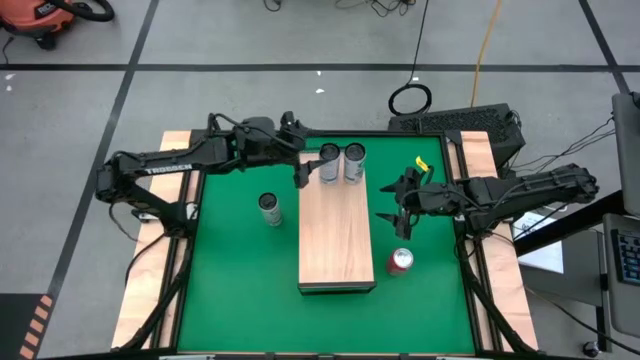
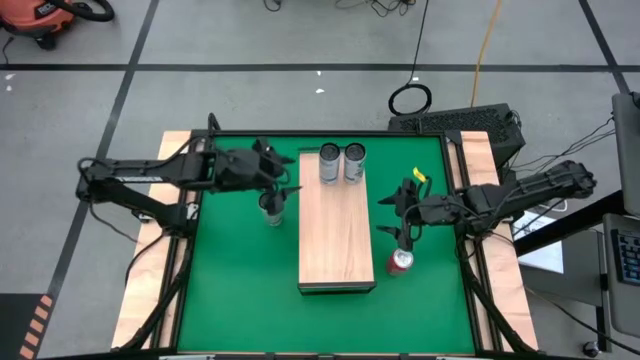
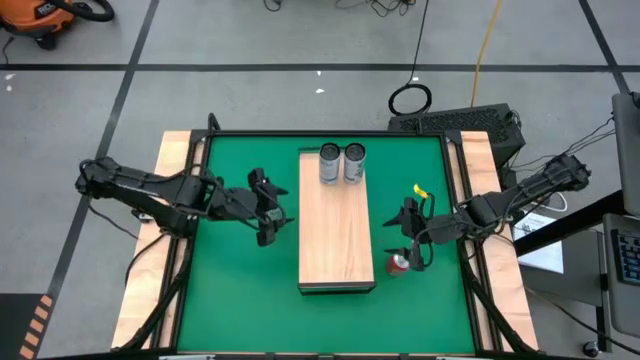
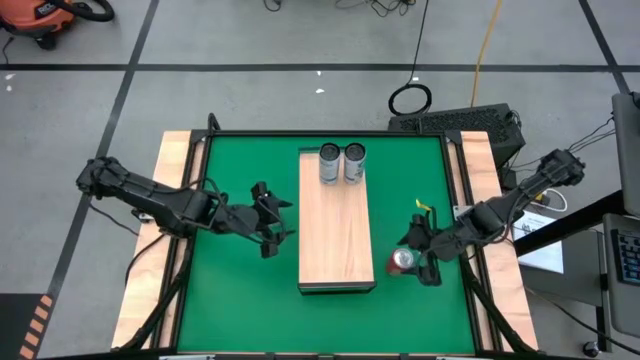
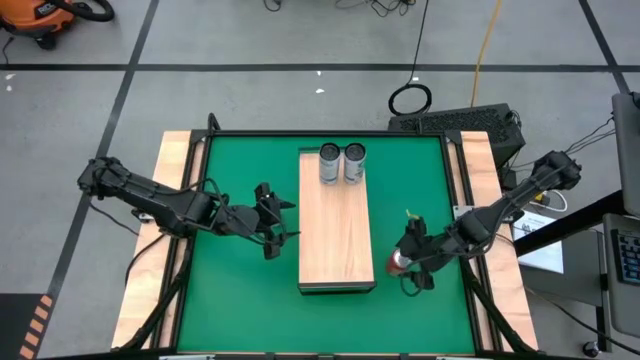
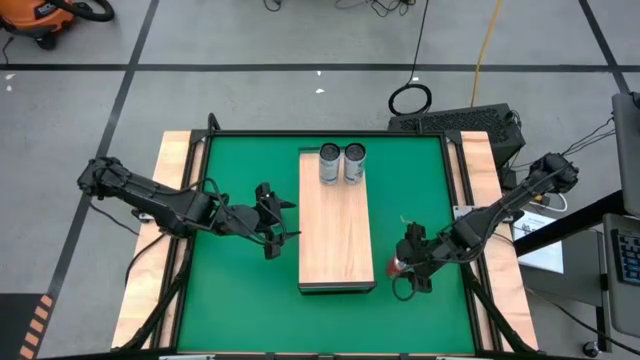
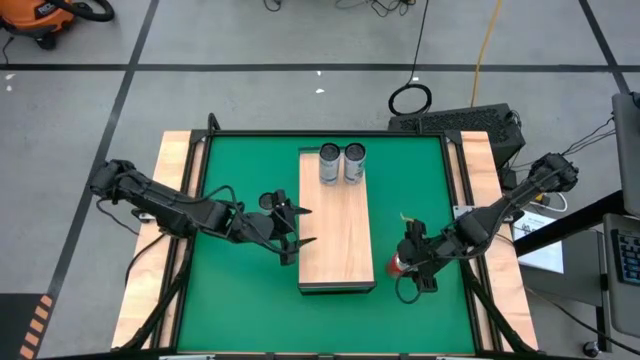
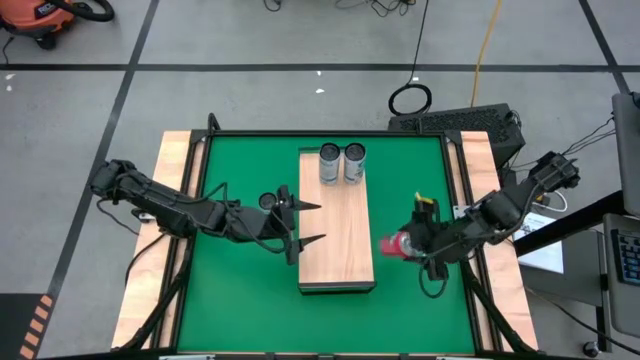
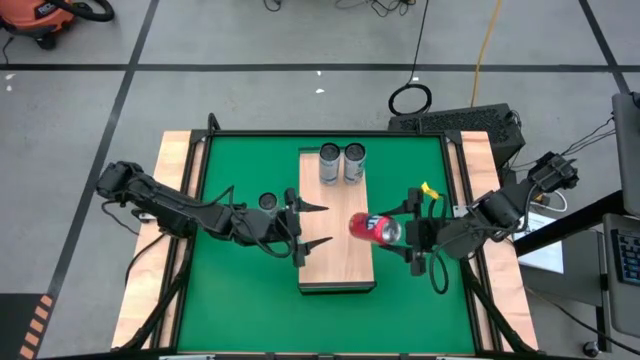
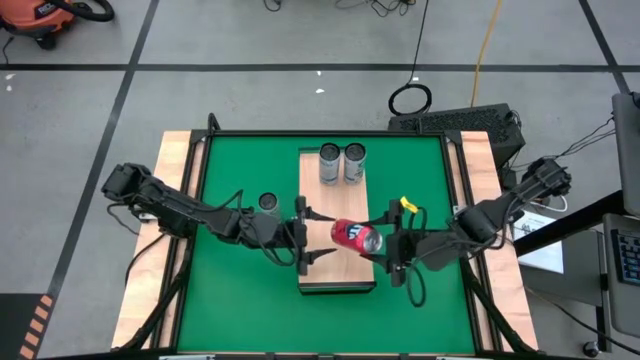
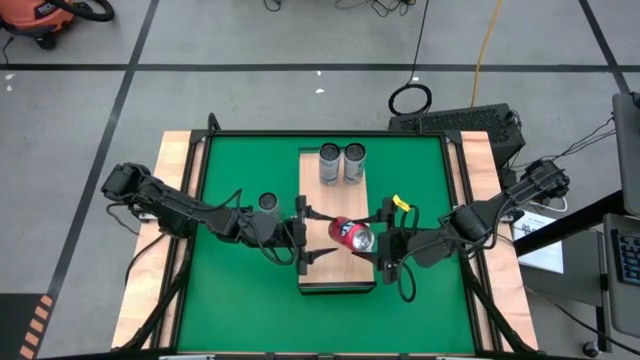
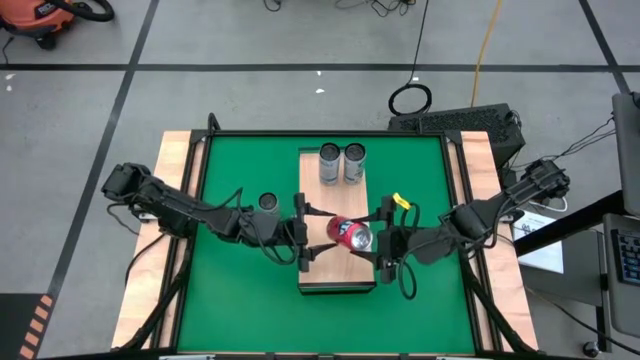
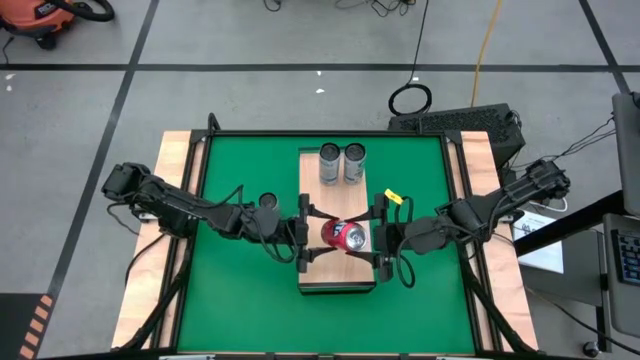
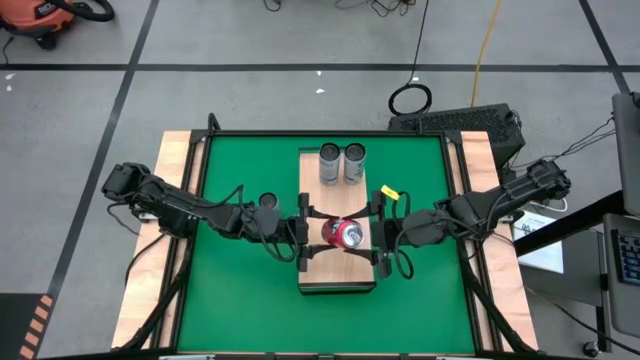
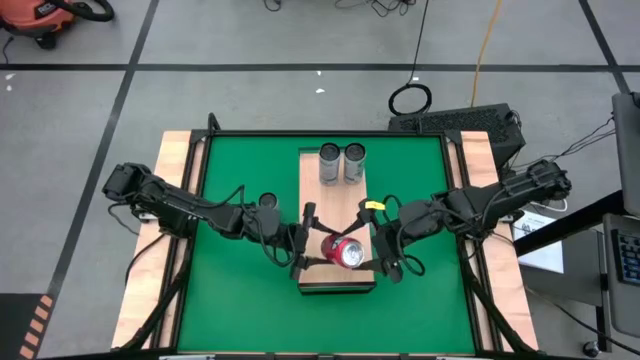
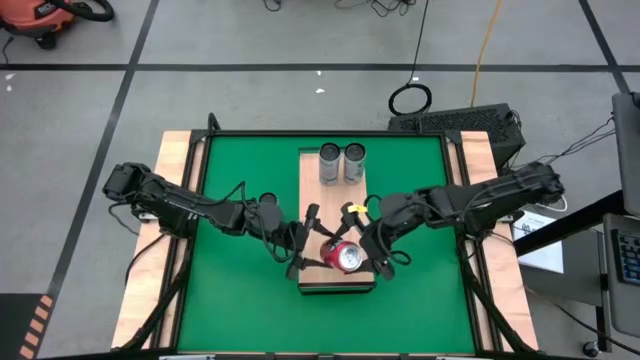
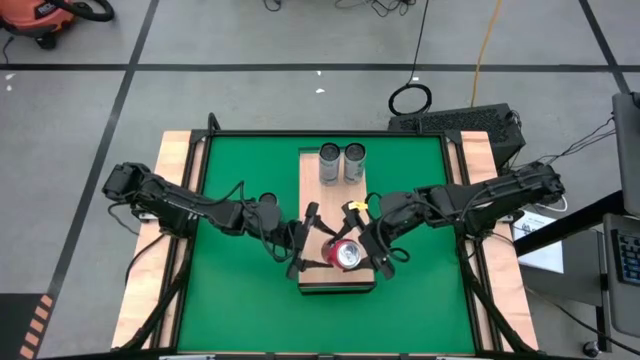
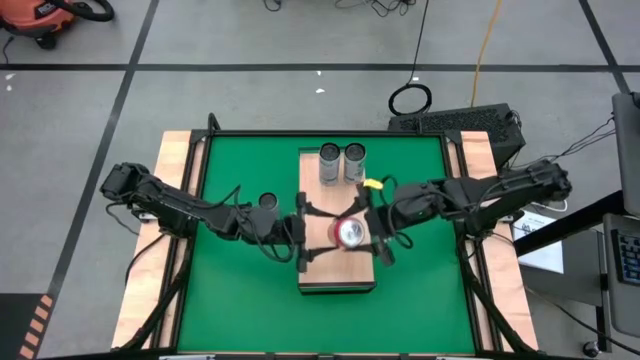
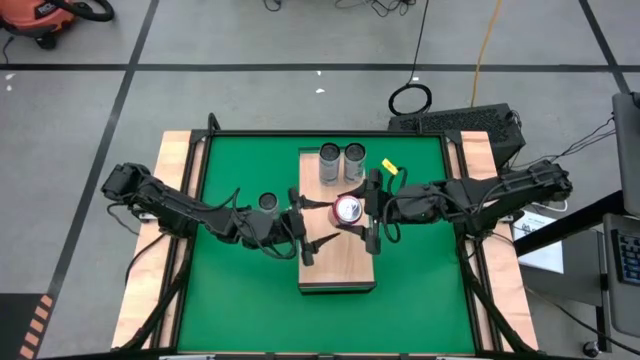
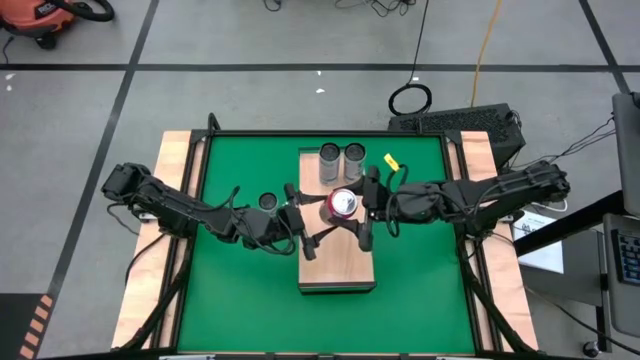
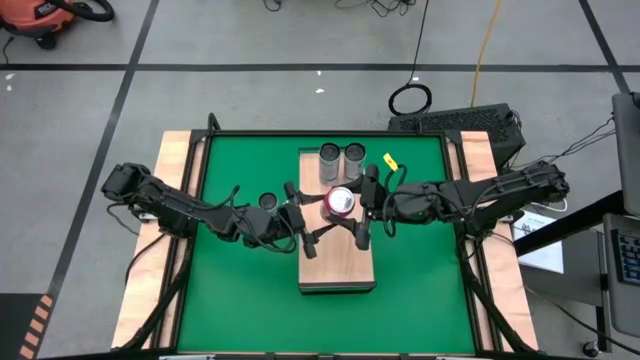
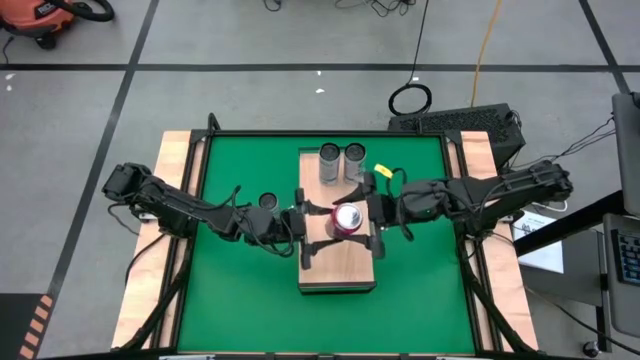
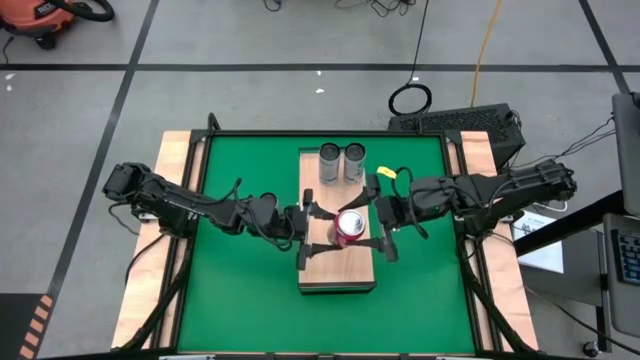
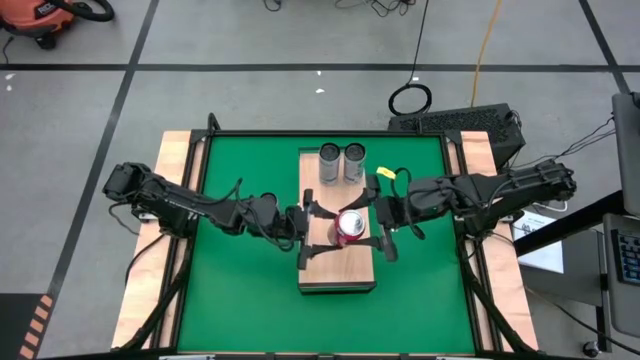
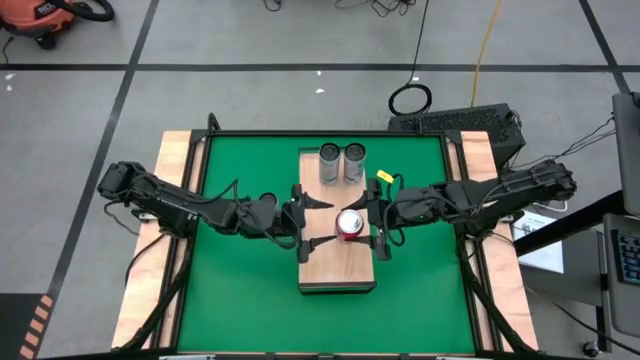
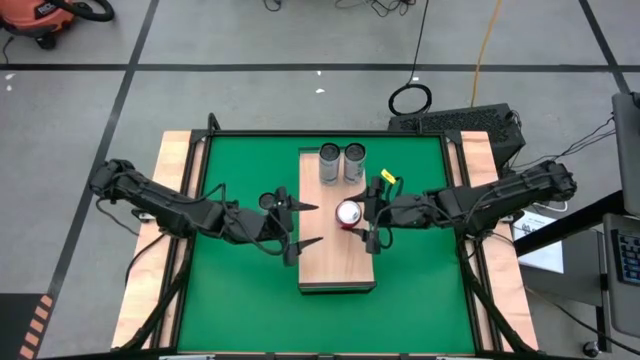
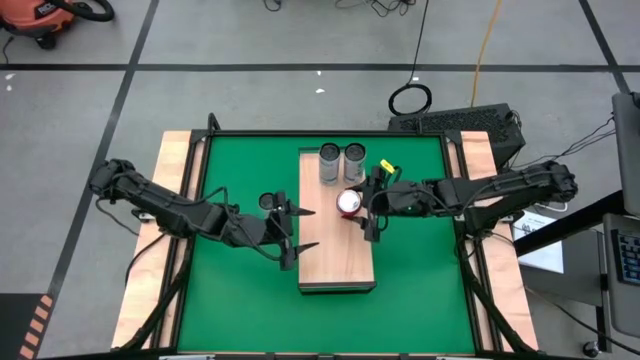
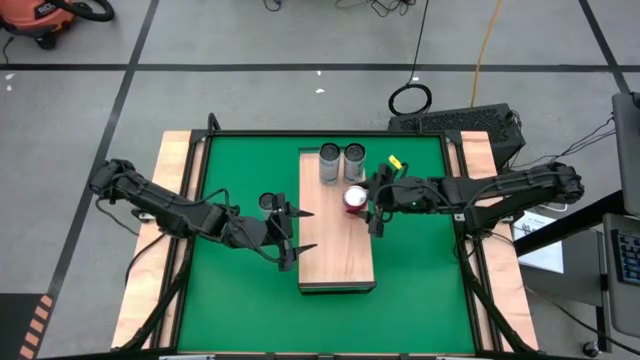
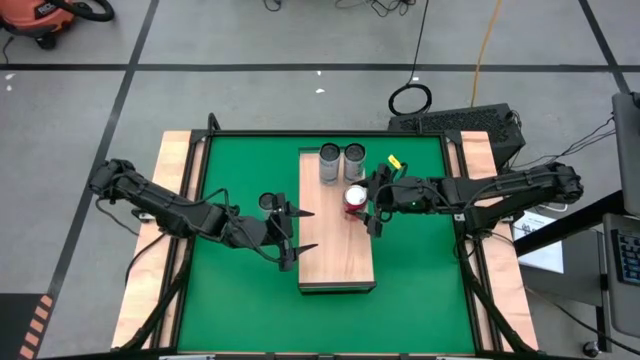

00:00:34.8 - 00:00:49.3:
Task: Place canned beverage on shelf
Put the red soda can on the shelf

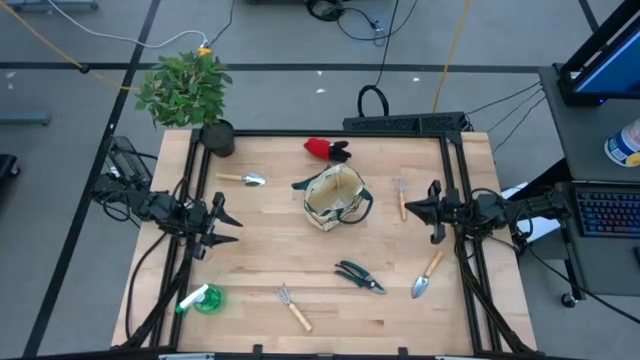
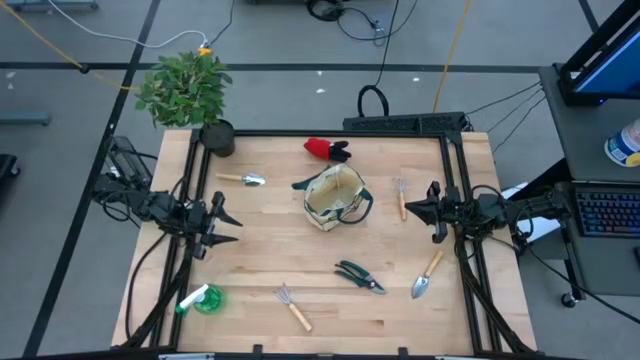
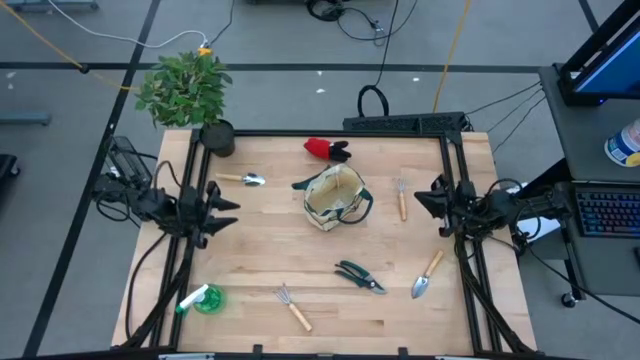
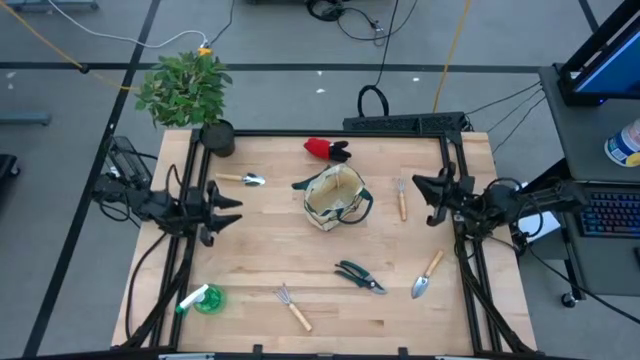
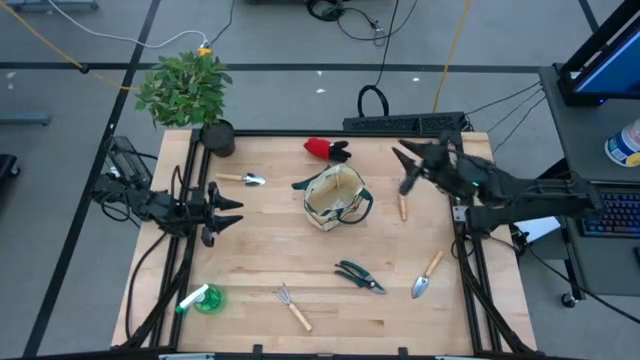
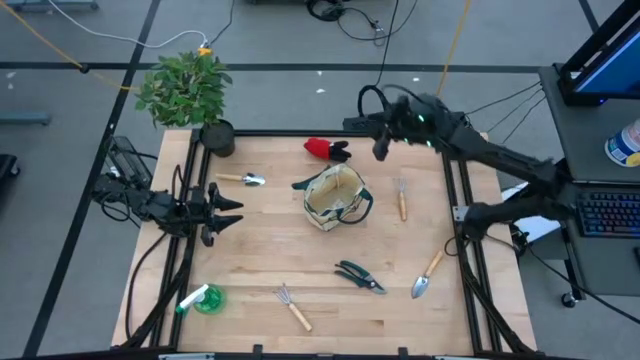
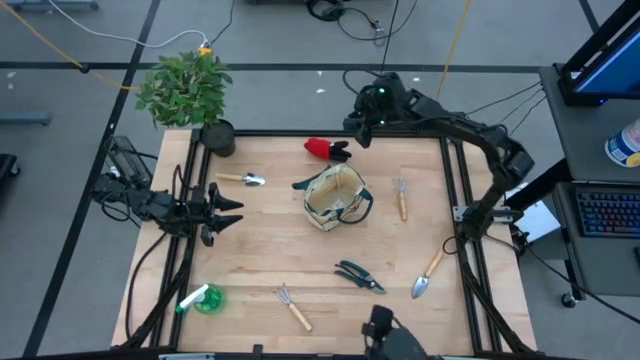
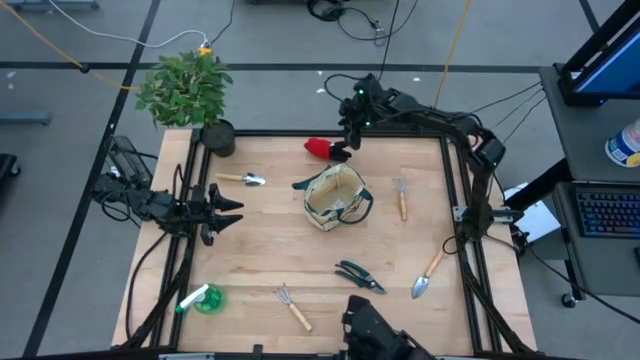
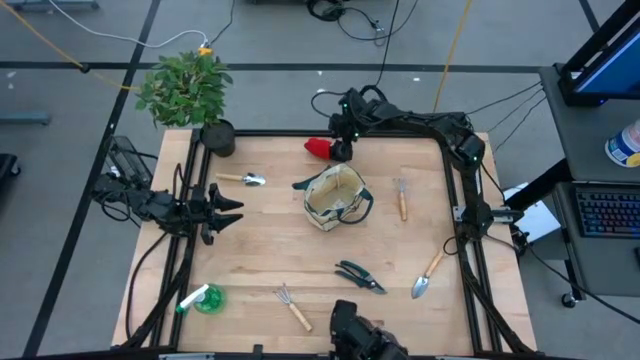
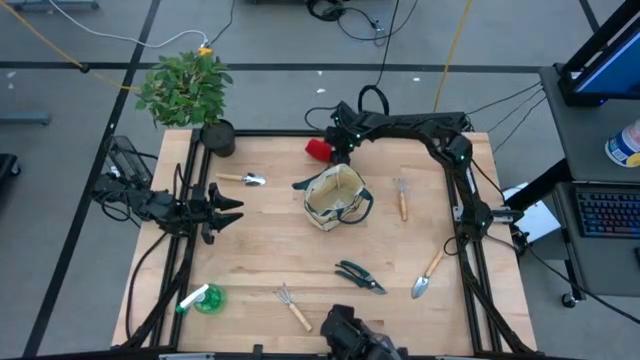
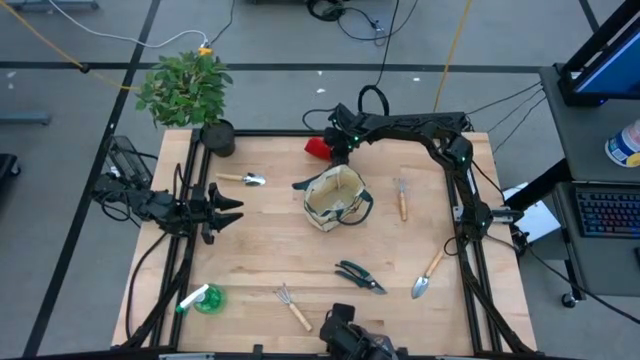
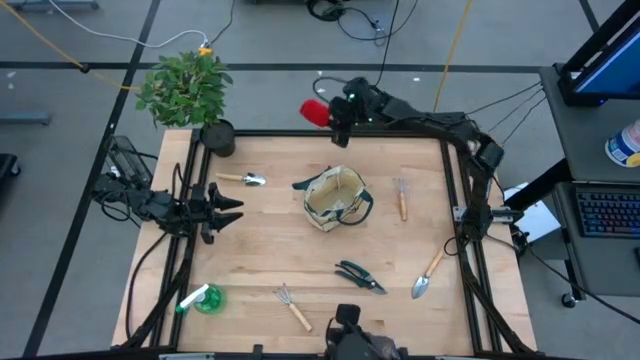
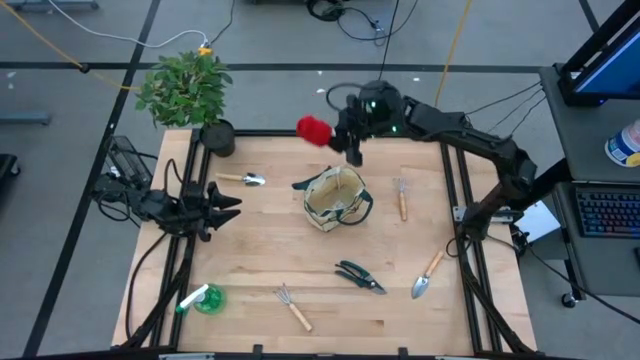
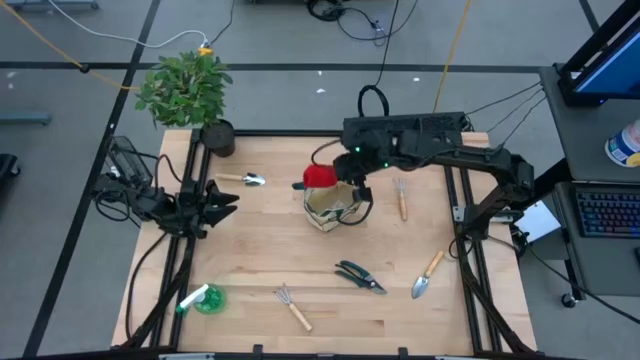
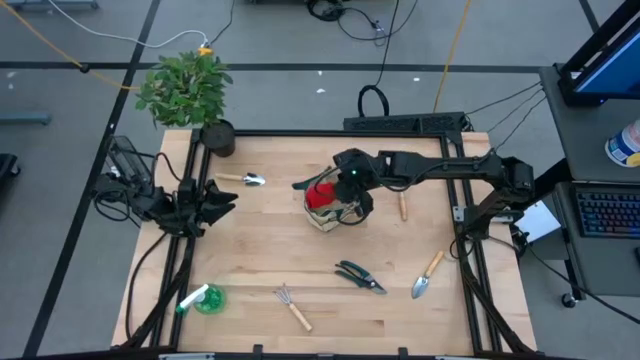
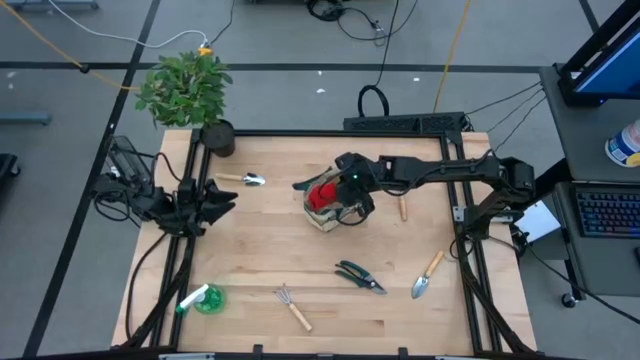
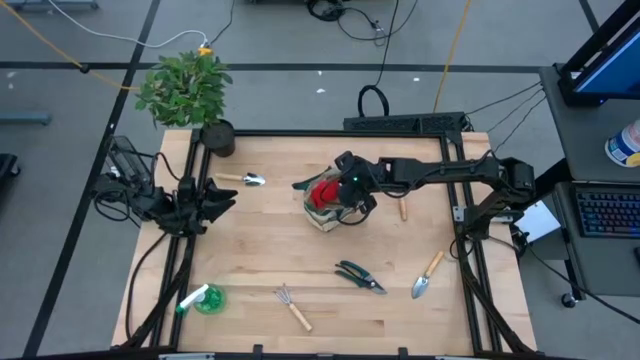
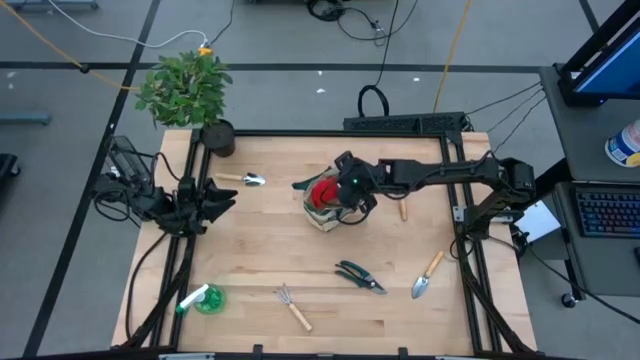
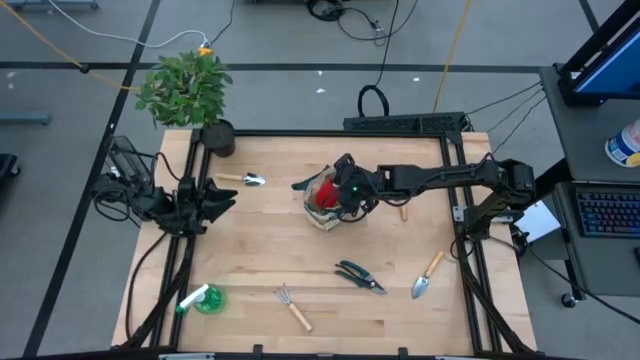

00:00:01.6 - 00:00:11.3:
Task: Pick & Place Garden tools in Gardening bag
Put the red gloves into the light brown gardening bag
